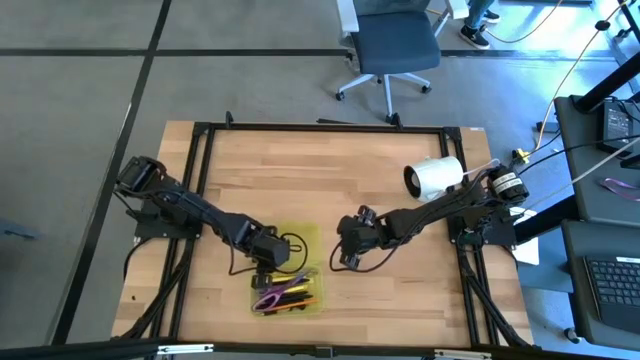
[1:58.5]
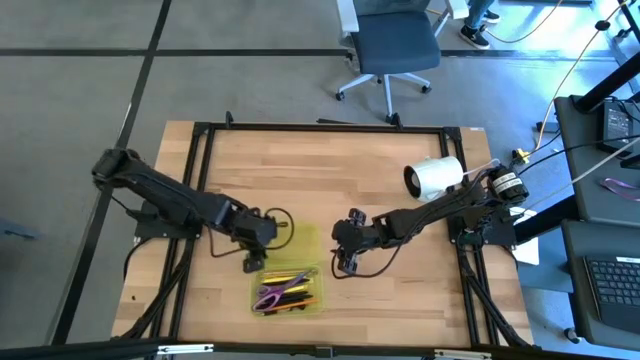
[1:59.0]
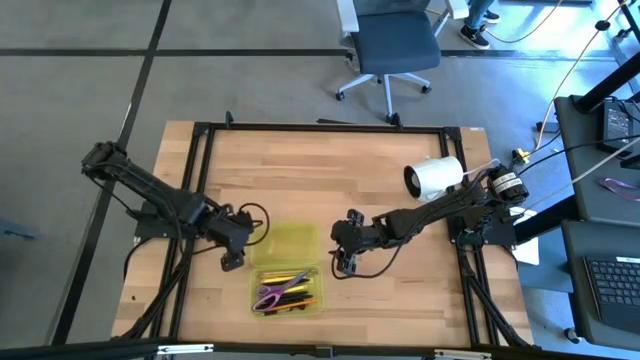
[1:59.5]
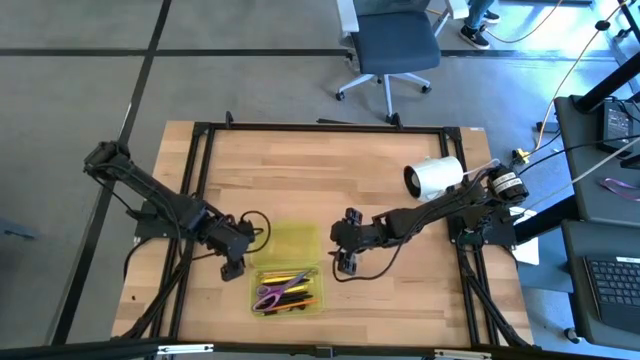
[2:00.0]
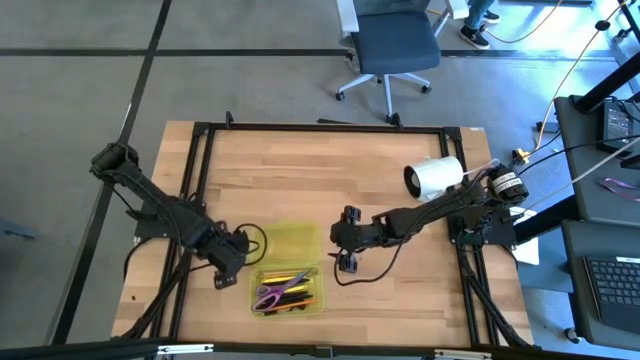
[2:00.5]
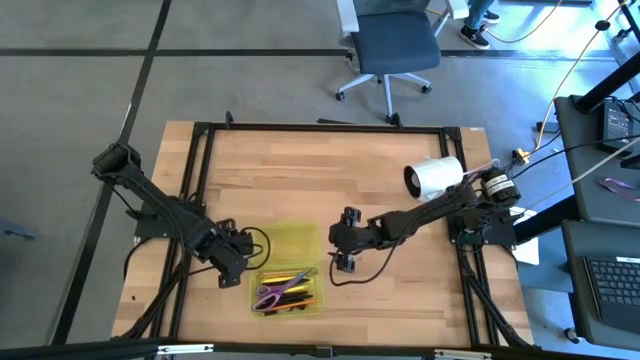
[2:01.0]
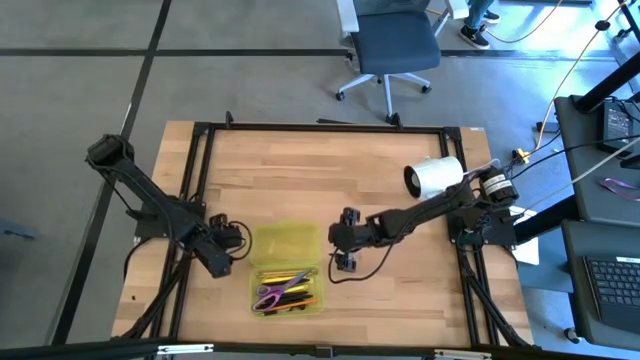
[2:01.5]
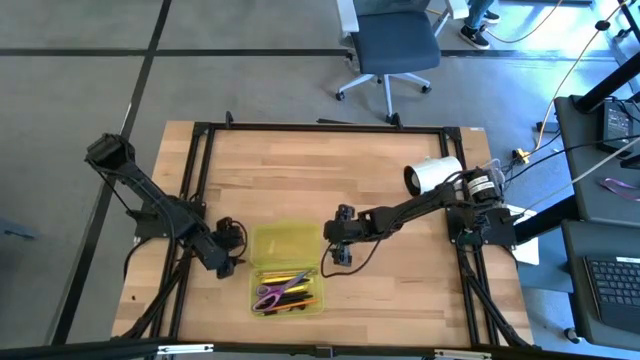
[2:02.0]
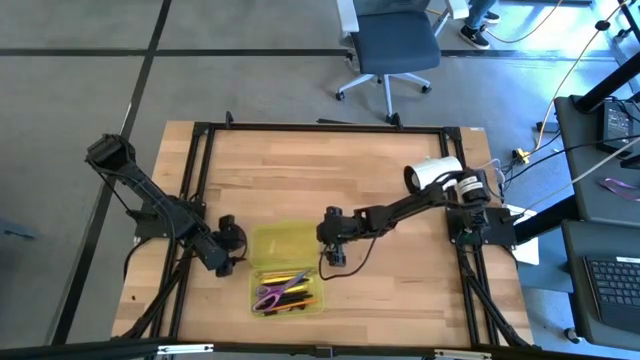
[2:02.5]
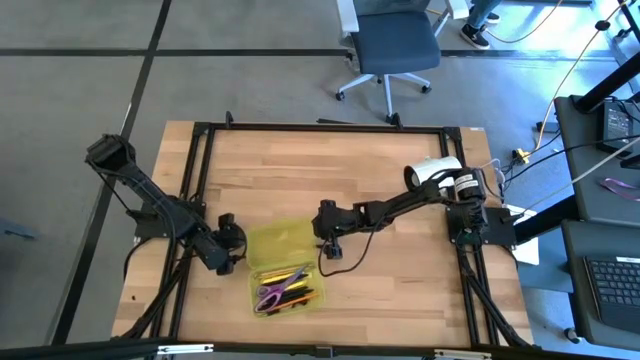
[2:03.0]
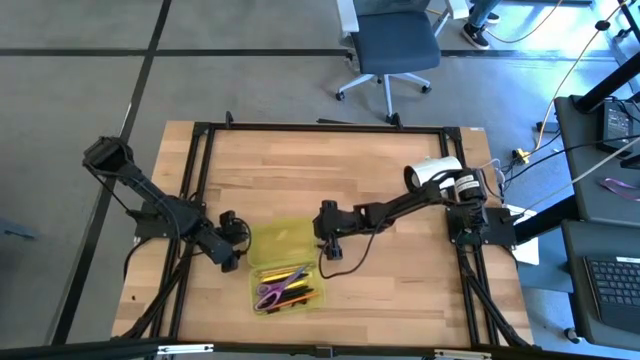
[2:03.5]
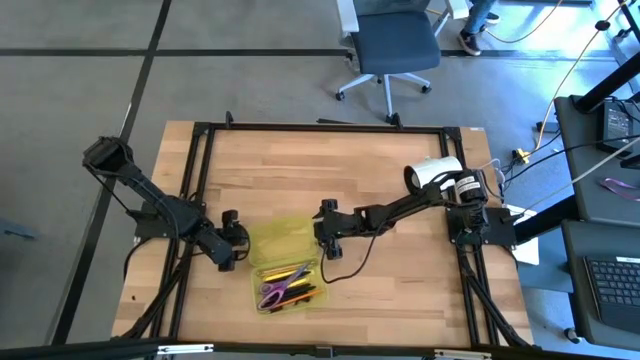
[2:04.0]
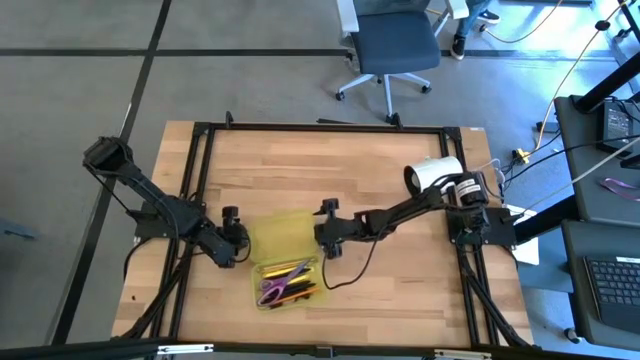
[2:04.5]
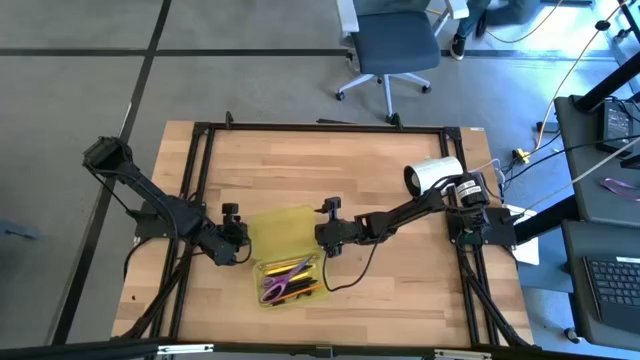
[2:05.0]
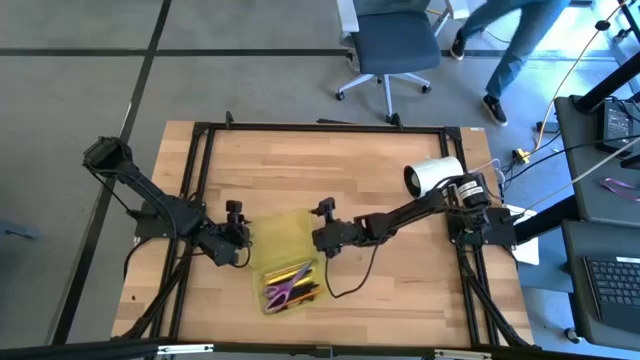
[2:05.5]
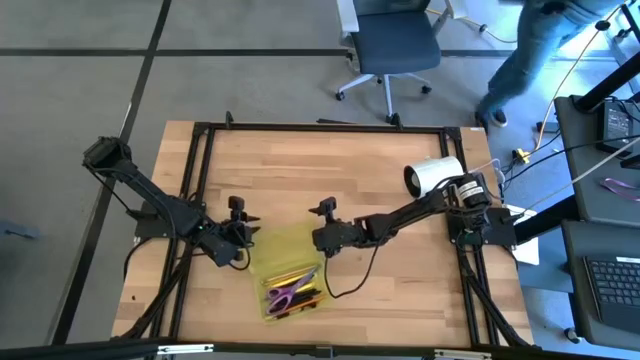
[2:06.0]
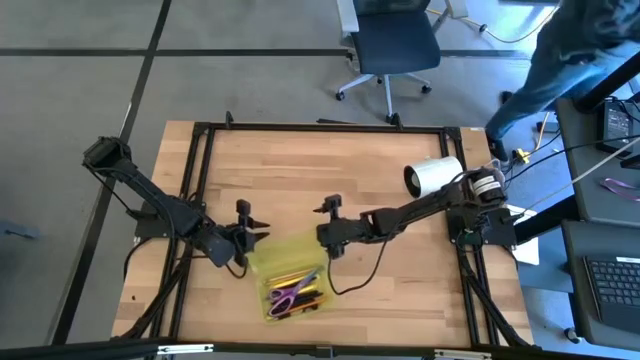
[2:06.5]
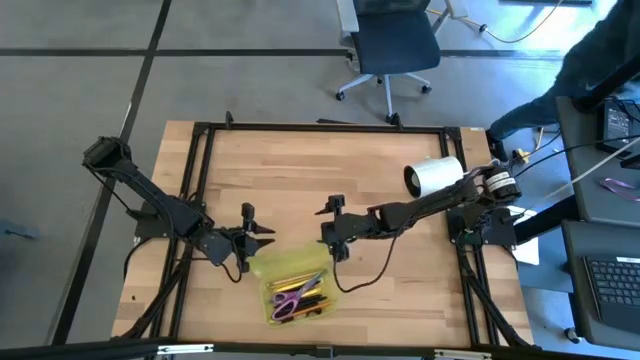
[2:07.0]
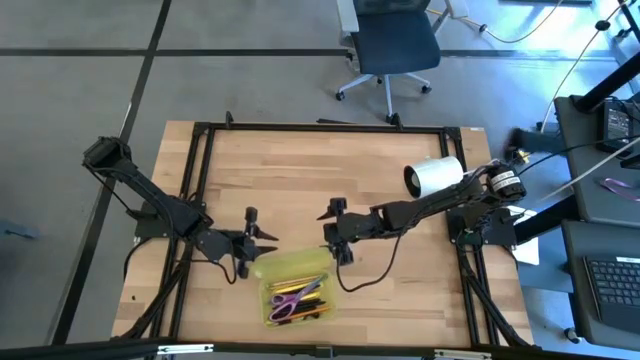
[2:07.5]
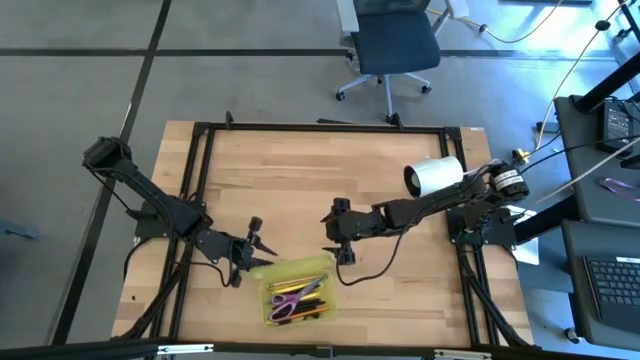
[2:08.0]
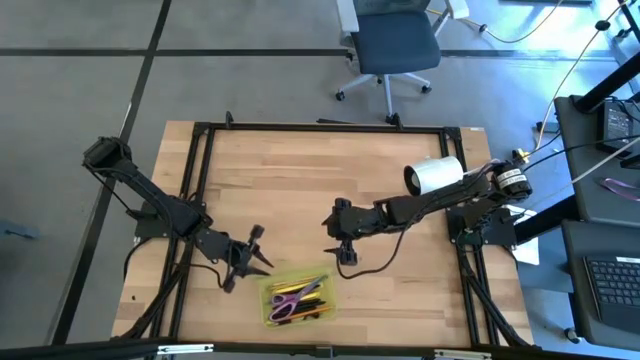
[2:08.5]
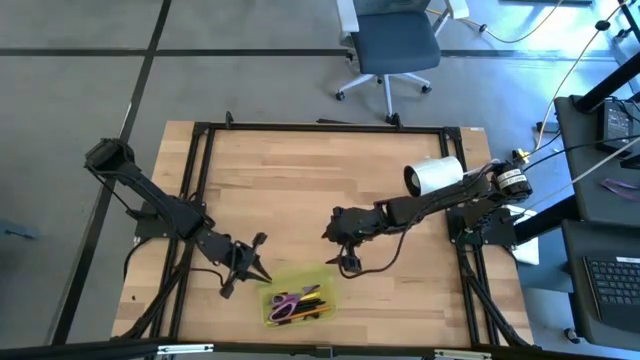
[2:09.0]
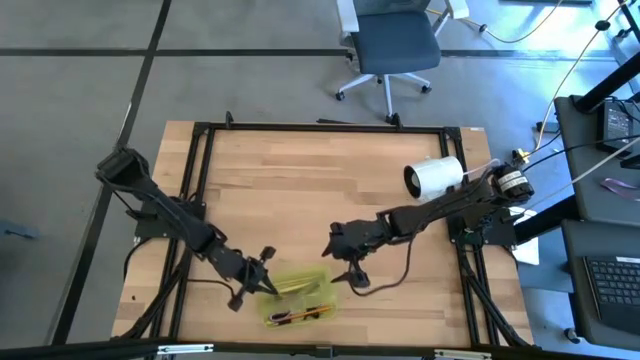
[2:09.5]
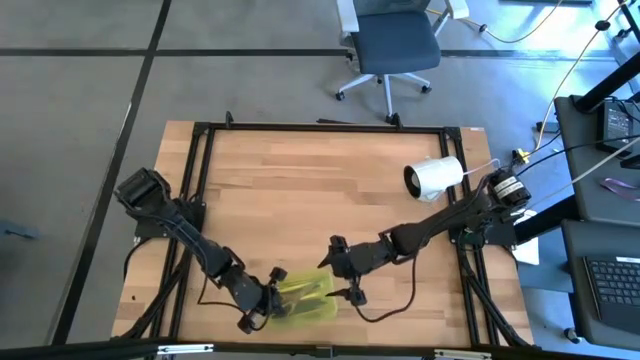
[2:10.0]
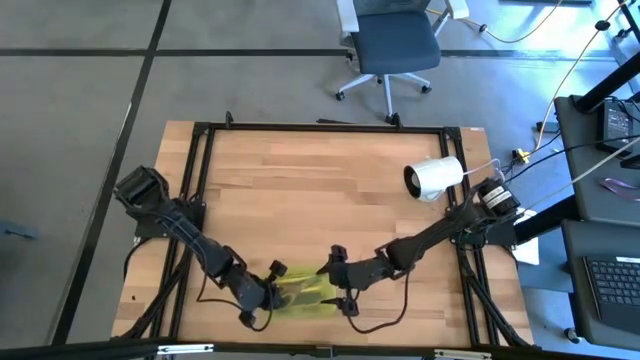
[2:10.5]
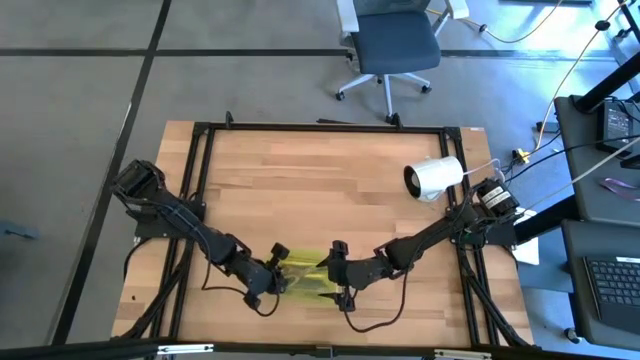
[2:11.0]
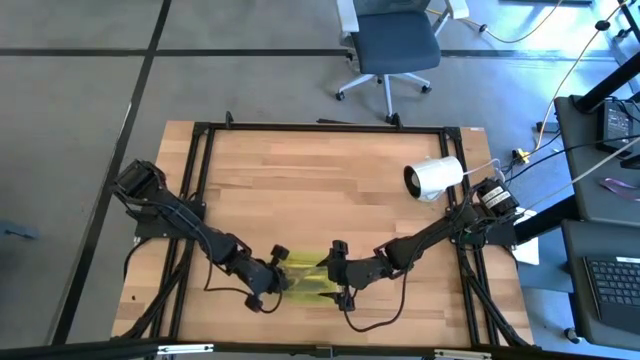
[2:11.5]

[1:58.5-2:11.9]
Task: Pick & place school supplies into a supply box
Close the yellow supply box

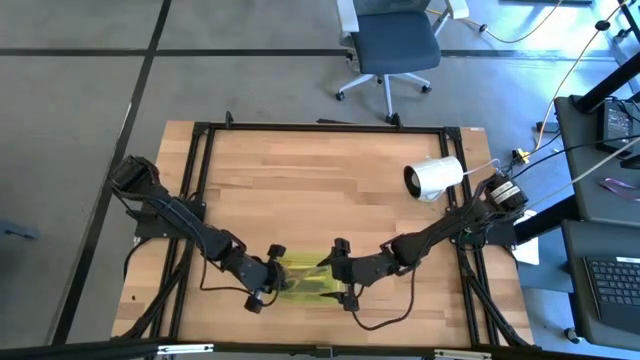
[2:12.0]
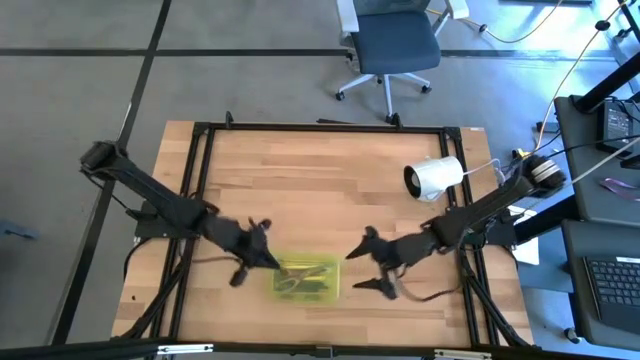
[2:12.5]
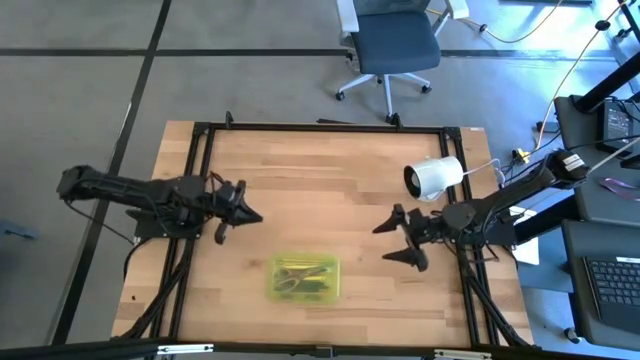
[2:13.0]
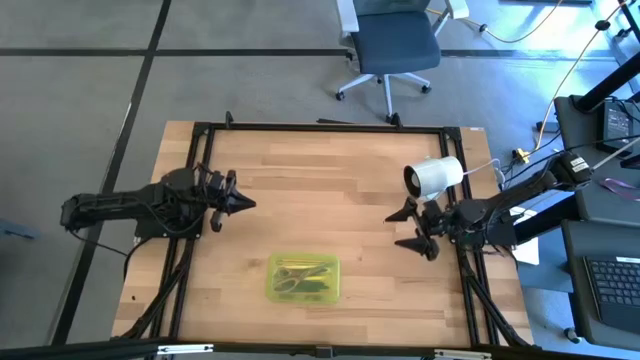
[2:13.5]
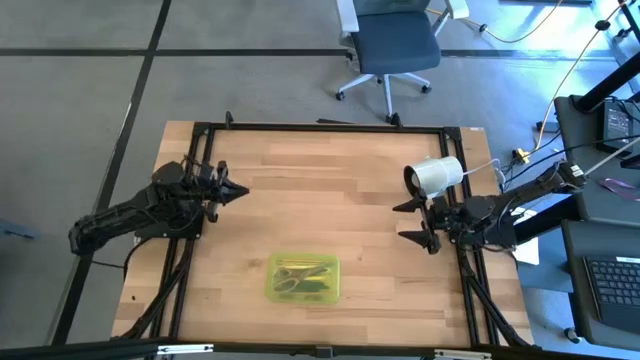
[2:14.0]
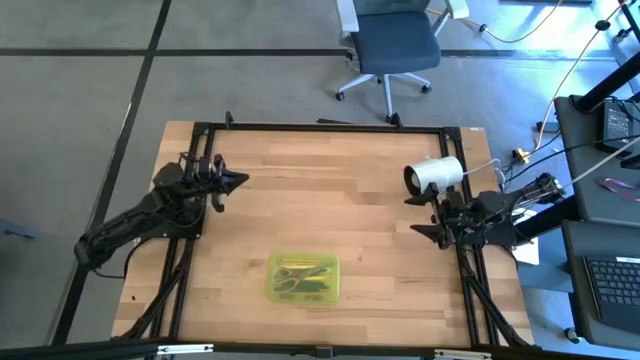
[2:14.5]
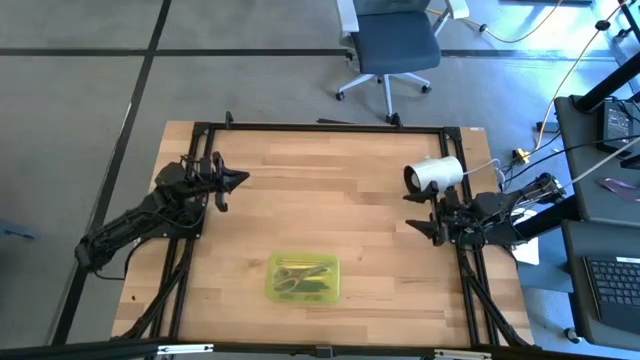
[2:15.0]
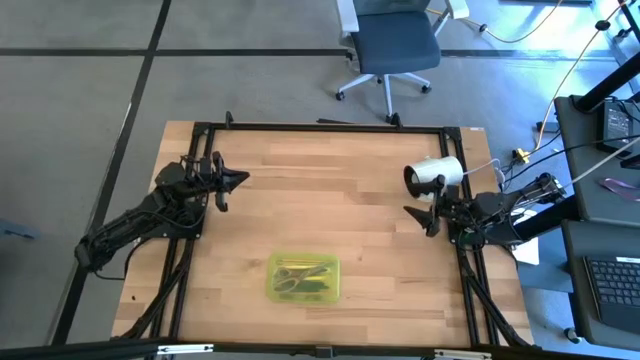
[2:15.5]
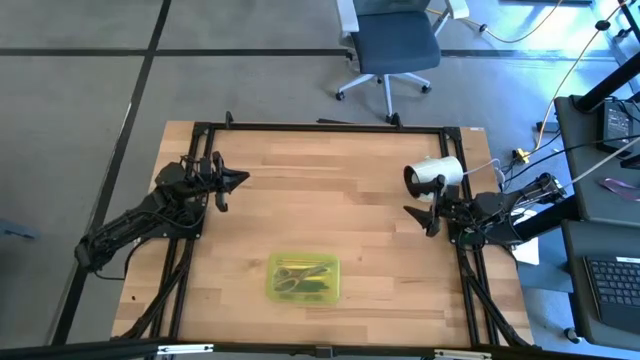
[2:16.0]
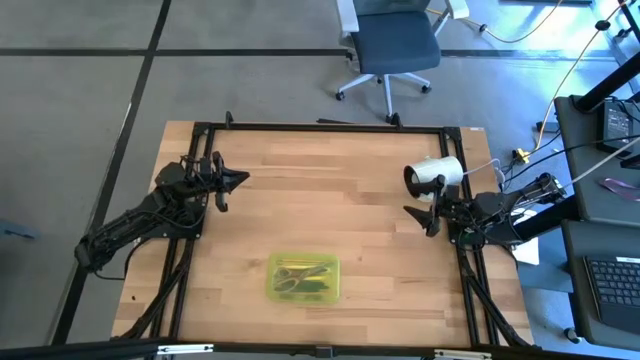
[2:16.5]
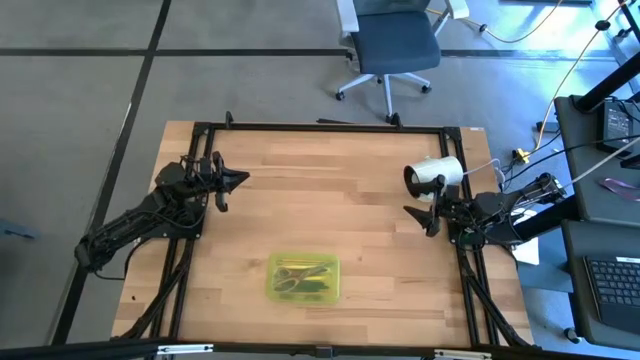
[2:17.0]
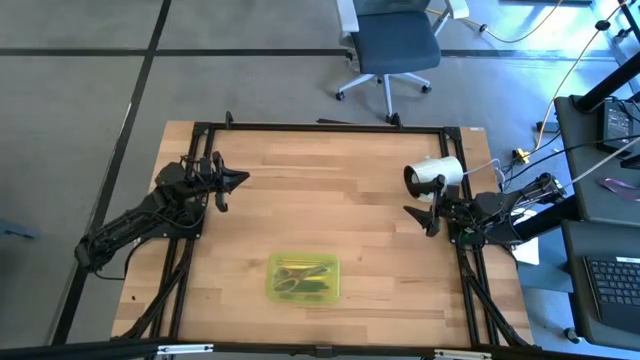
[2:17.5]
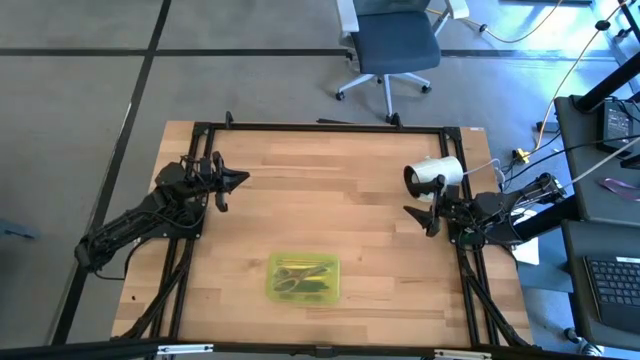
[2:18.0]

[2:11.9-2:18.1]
Return to Home Position

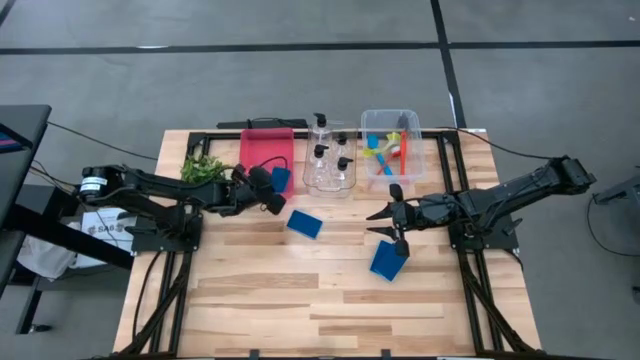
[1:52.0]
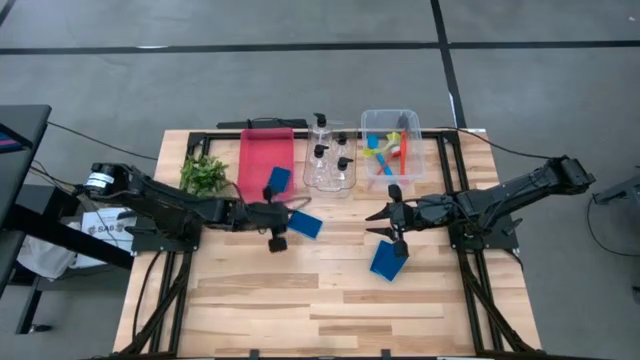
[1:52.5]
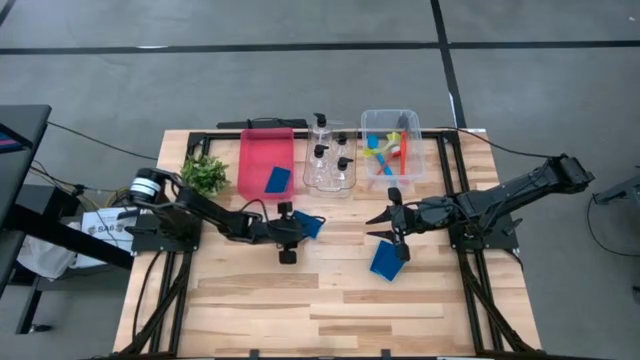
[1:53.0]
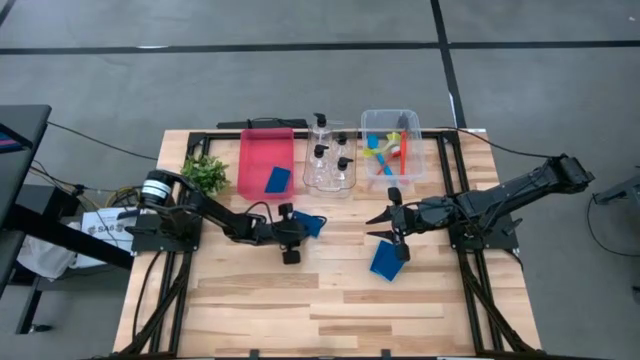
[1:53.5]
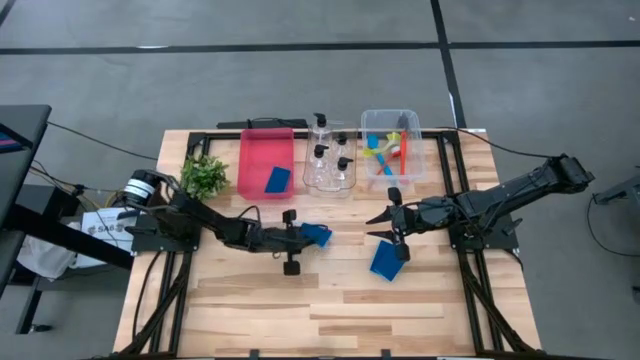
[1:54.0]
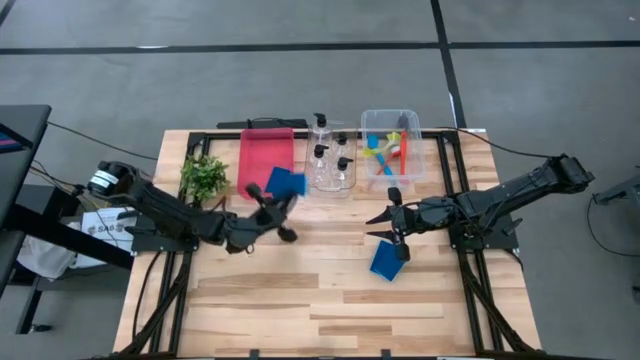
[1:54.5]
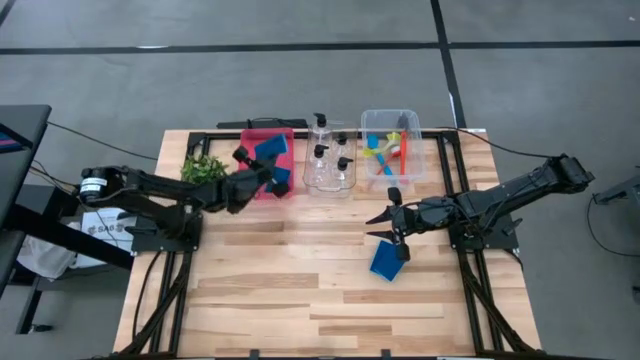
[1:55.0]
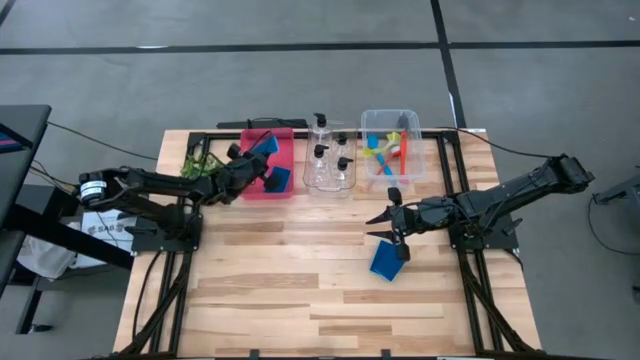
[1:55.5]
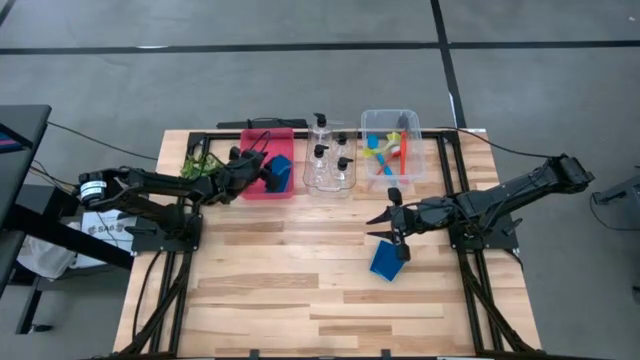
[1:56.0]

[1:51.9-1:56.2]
Task: Pick & Place Kitchen Sink Supplies
Put the blue sponge wipe into the red transparent bin
